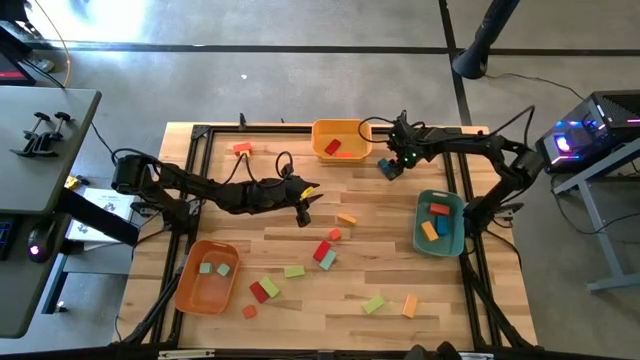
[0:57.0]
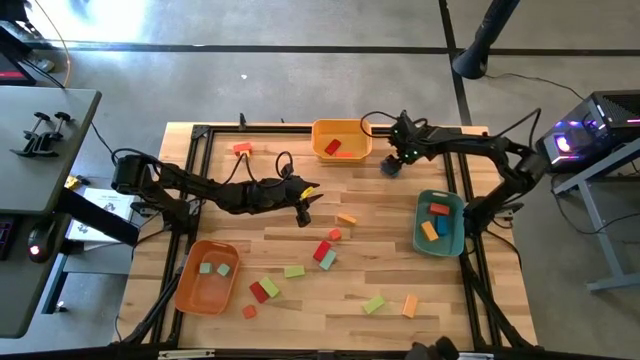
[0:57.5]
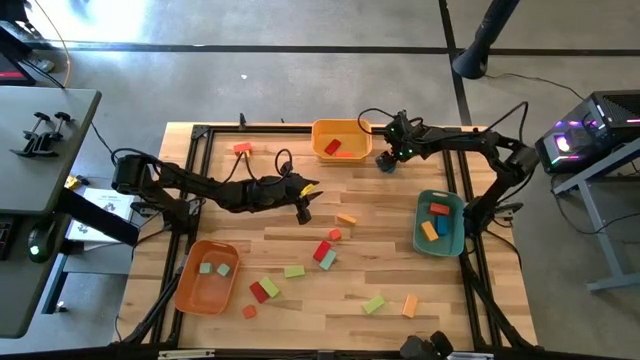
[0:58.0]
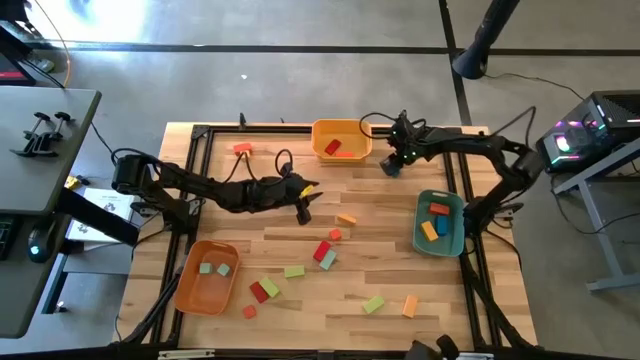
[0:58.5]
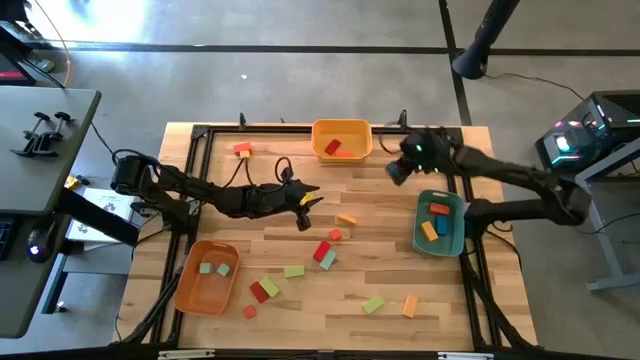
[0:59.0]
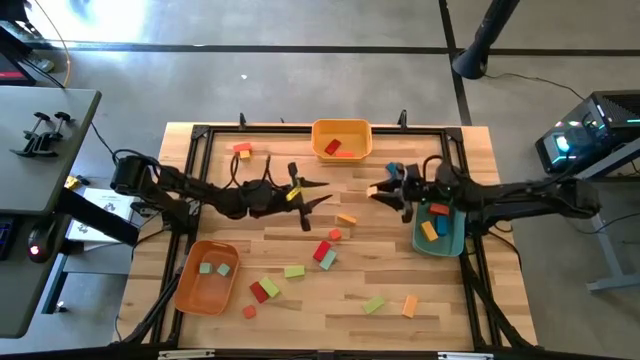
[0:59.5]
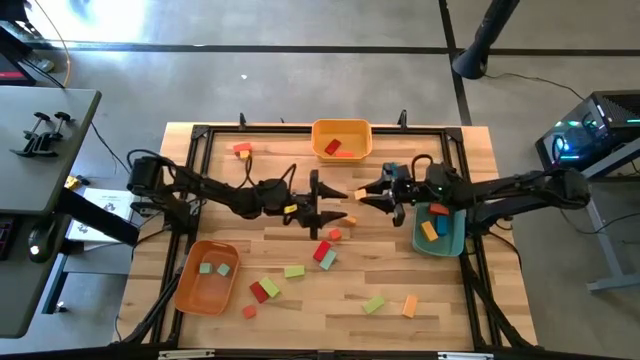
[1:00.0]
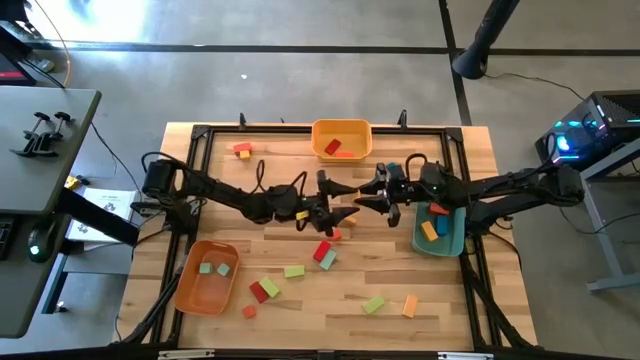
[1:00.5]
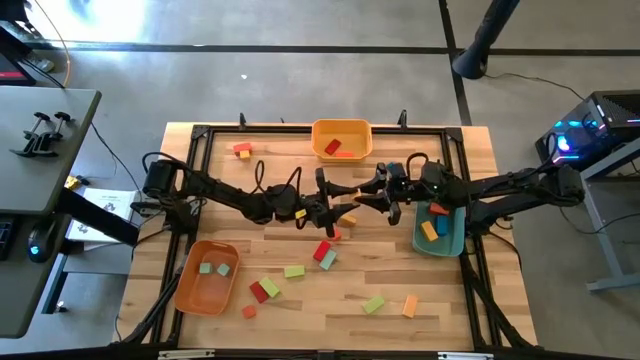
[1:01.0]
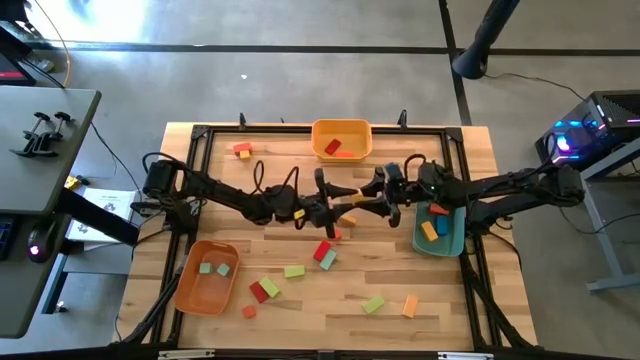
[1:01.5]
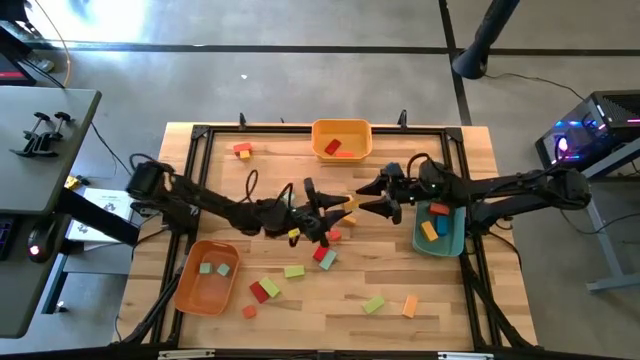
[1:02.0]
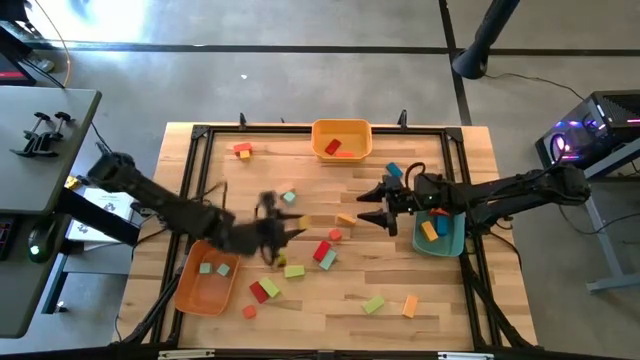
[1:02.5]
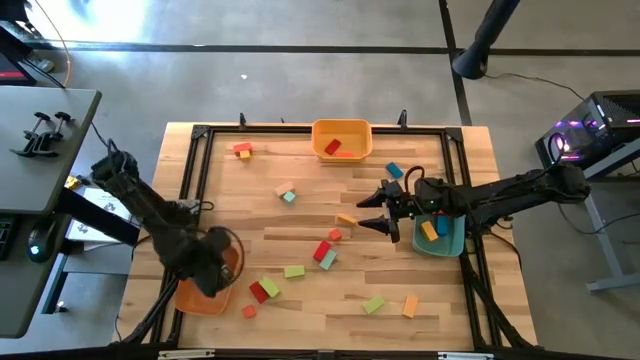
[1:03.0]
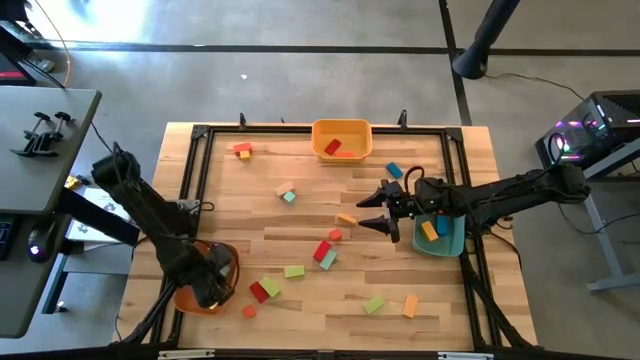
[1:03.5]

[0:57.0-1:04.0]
Task: Sort blocks by size
Put the yellow square block into the orange bin

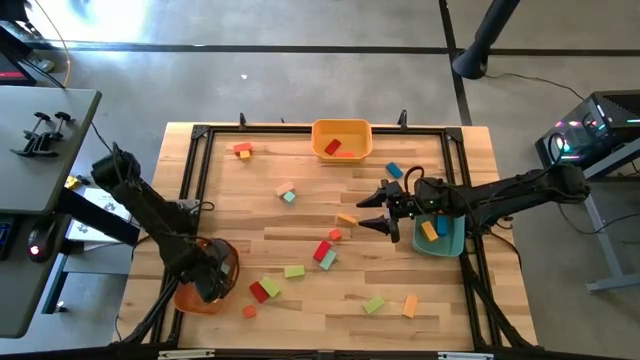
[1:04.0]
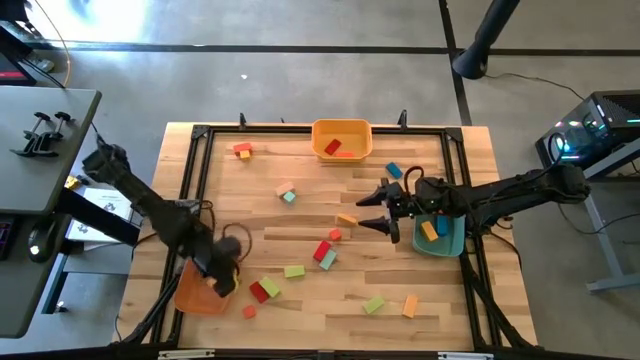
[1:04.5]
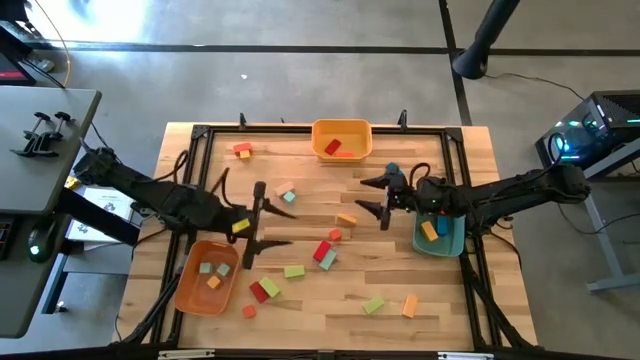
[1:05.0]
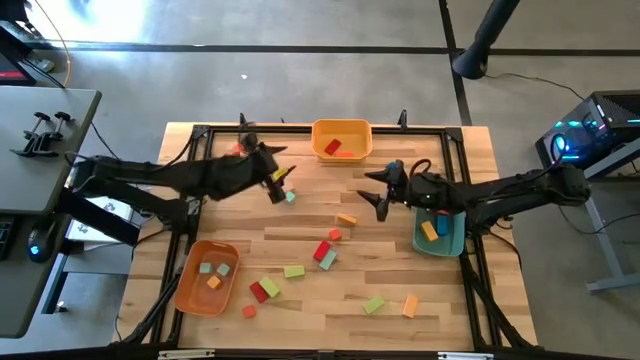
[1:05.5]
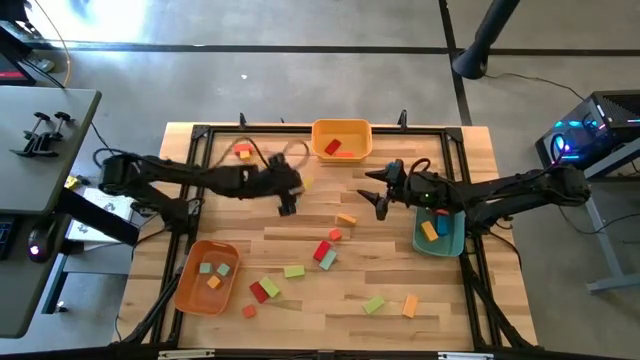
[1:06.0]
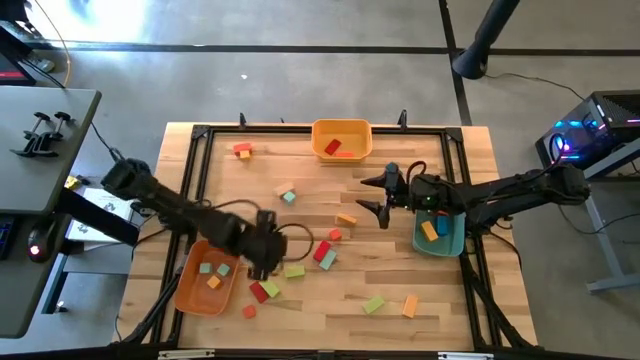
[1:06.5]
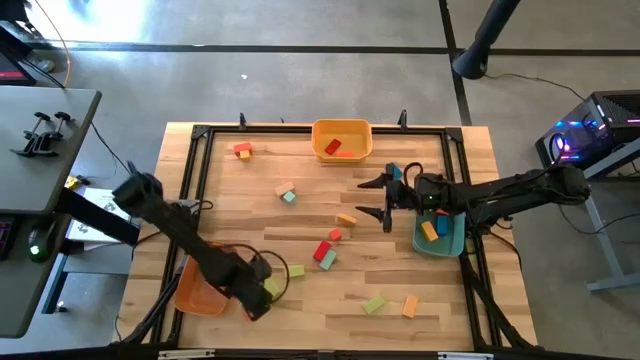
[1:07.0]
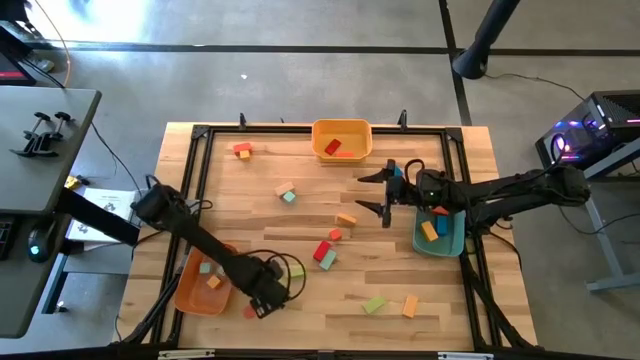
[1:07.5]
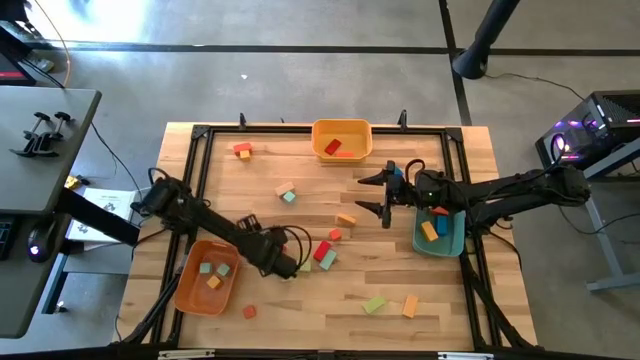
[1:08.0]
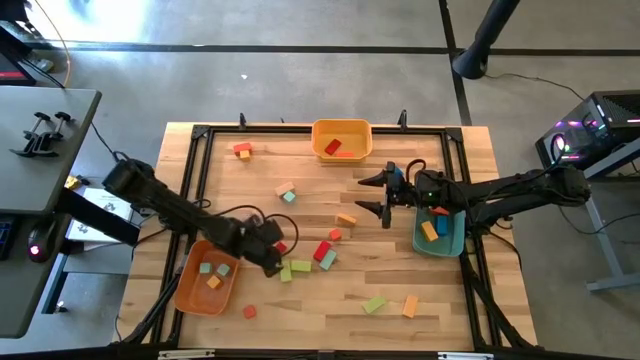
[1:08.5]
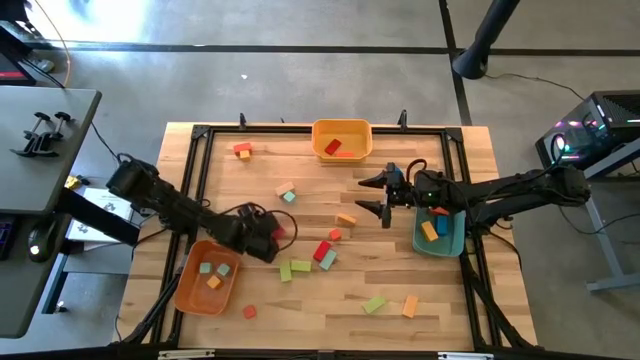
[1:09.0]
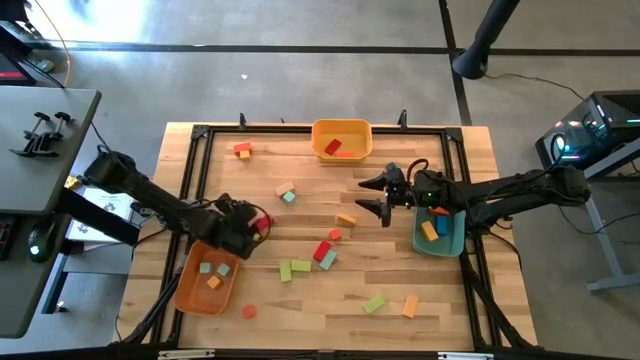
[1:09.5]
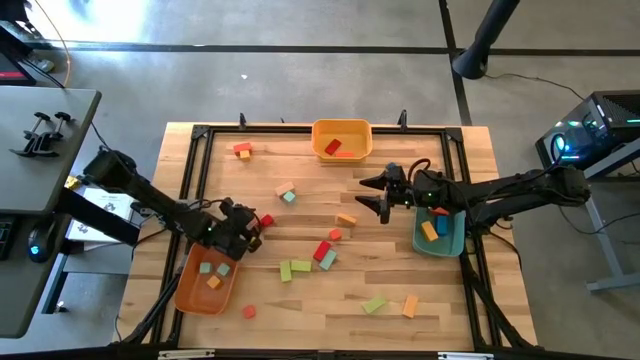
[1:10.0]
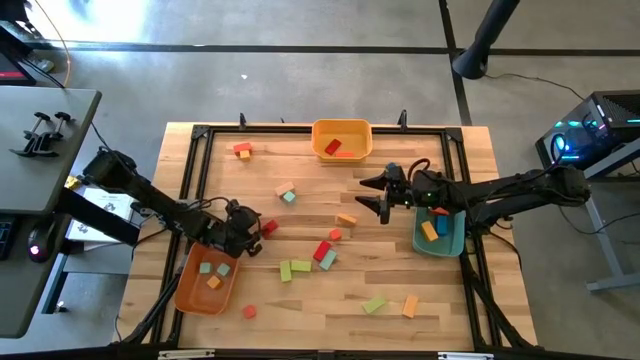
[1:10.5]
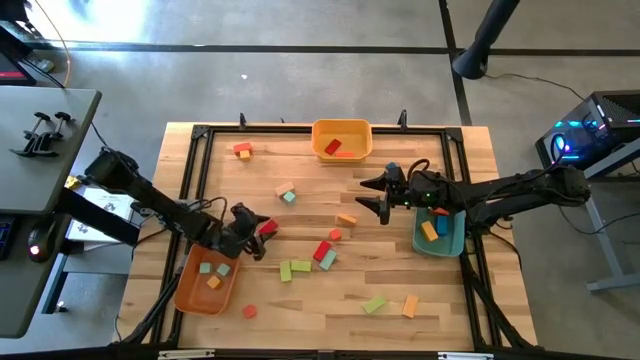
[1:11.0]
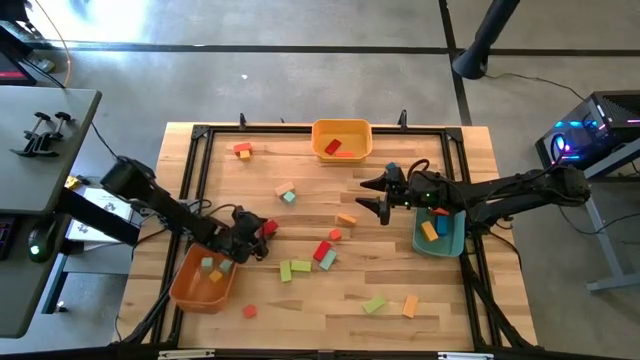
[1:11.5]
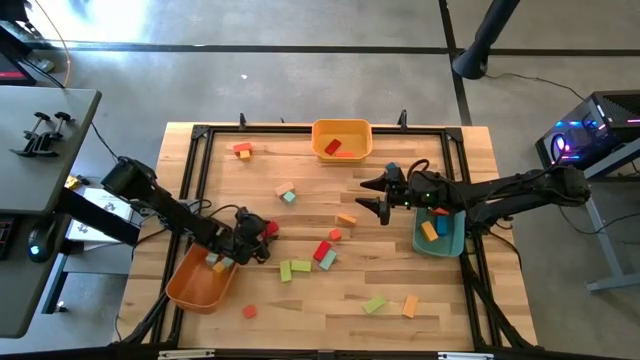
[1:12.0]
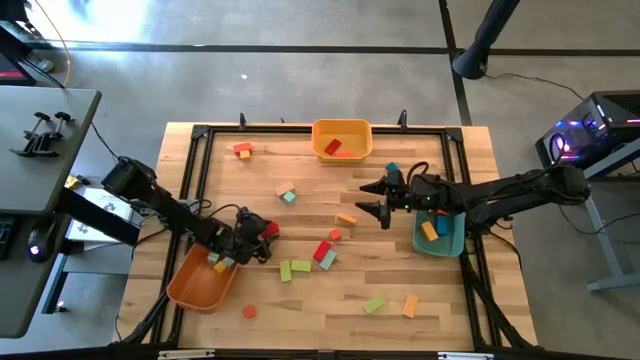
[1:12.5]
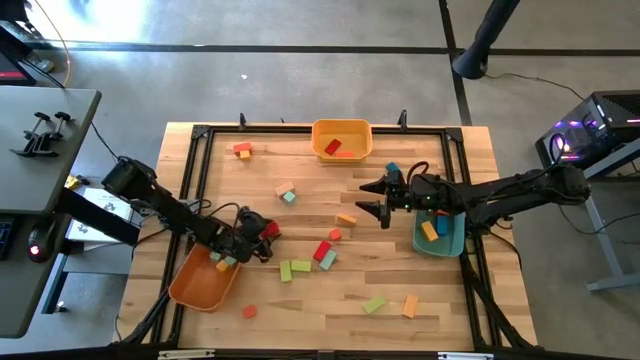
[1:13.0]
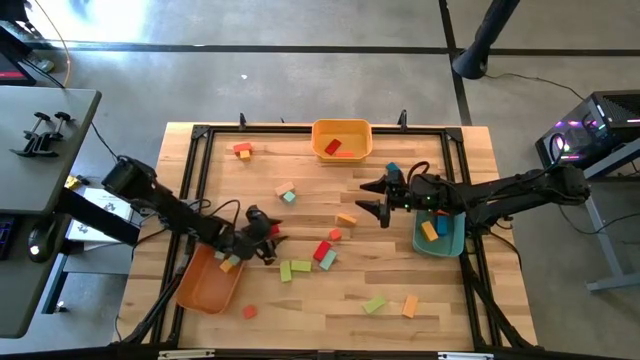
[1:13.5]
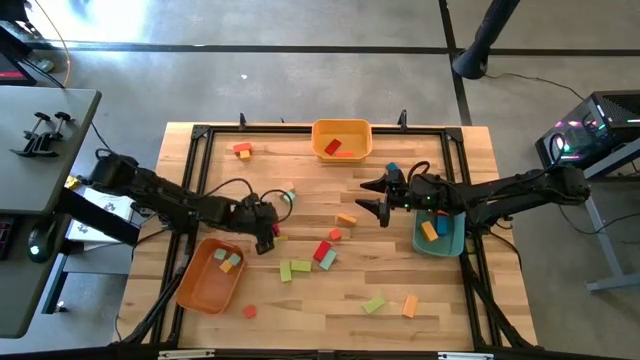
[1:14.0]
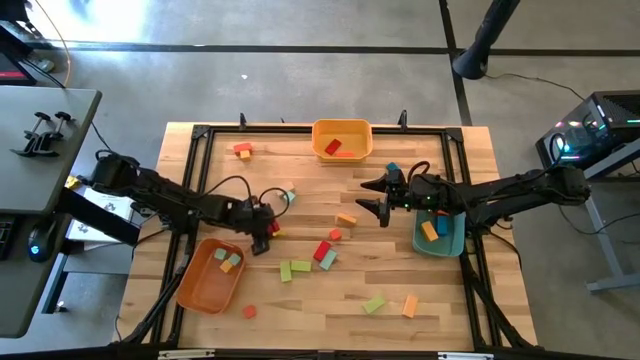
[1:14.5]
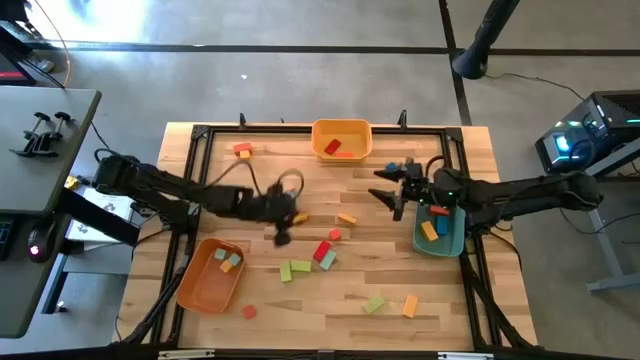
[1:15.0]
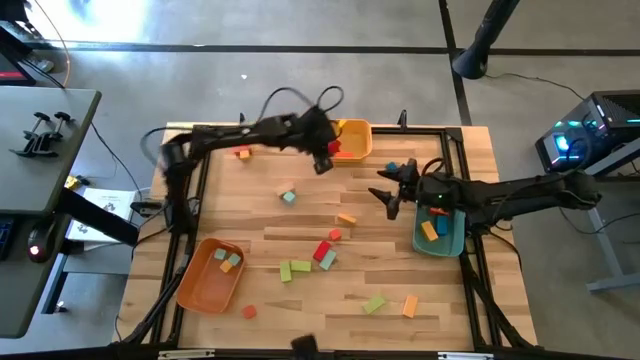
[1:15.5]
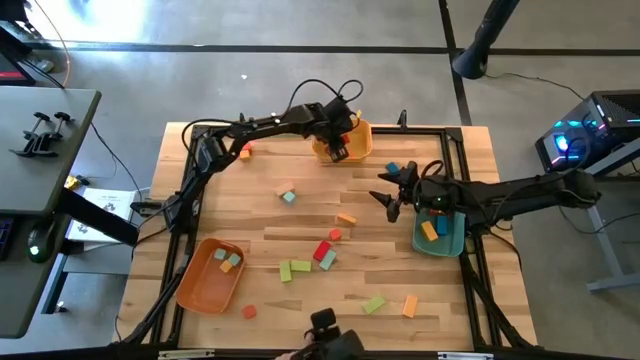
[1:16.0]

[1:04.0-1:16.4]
Put the red thin rectangular block into the yellow bin

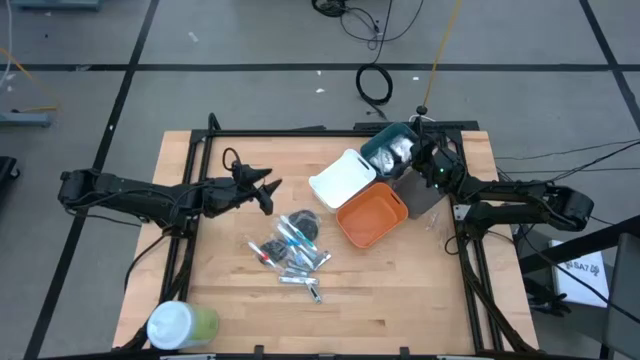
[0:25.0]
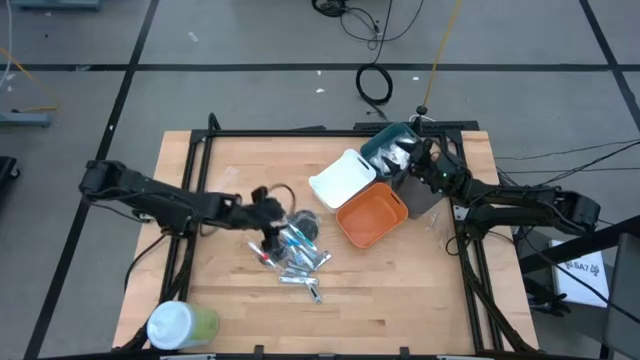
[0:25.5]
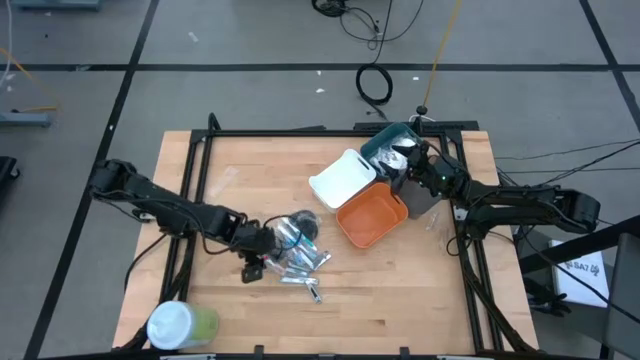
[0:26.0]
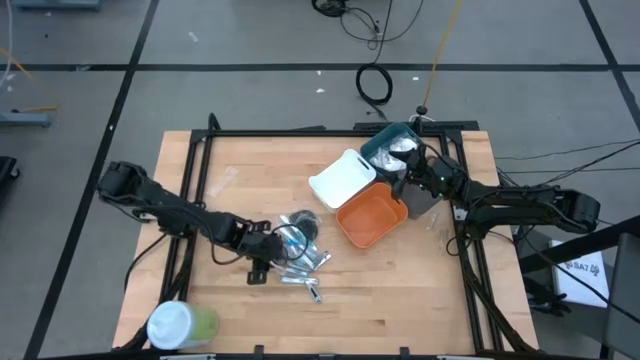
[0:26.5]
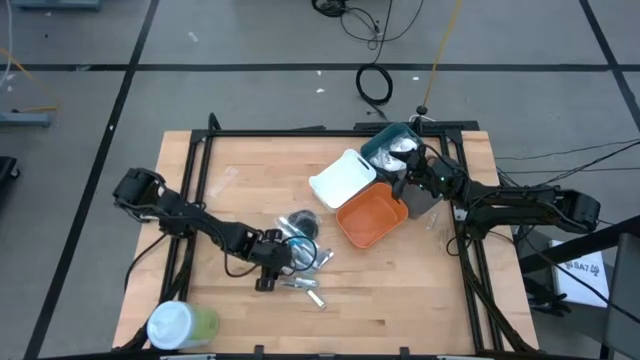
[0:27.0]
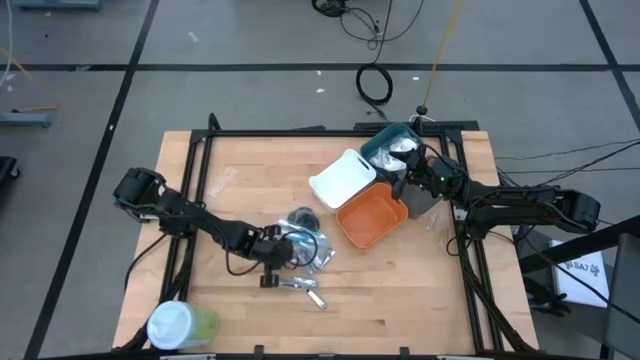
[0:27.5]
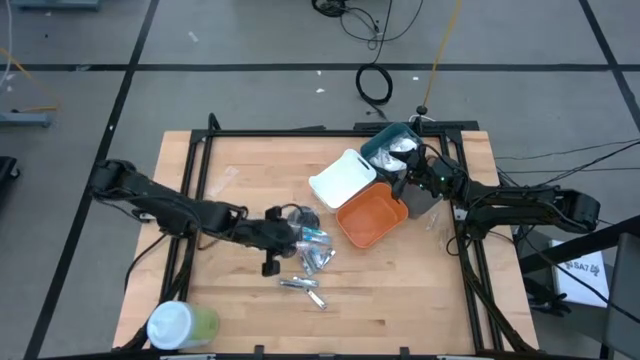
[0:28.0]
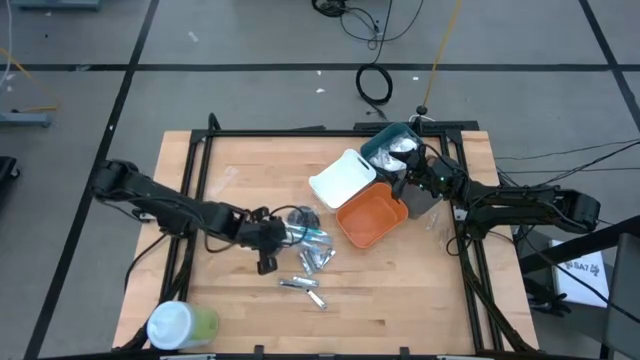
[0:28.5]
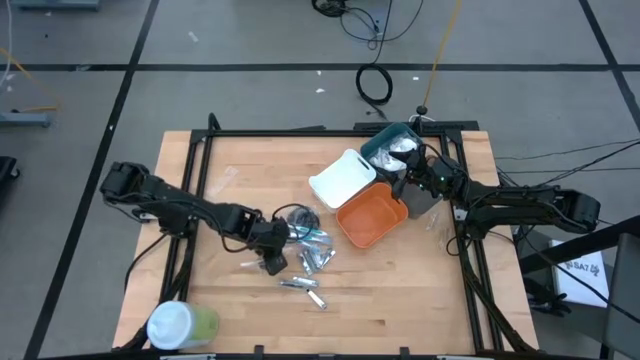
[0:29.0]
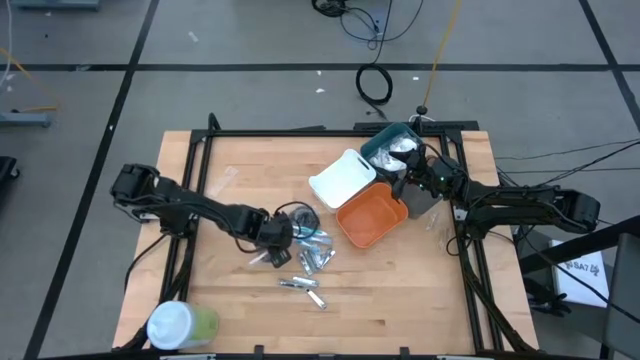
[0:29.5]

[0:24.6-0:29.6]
Task: Pick & Place Travel size toiletries
Put the orange toothbrush into the black bin
